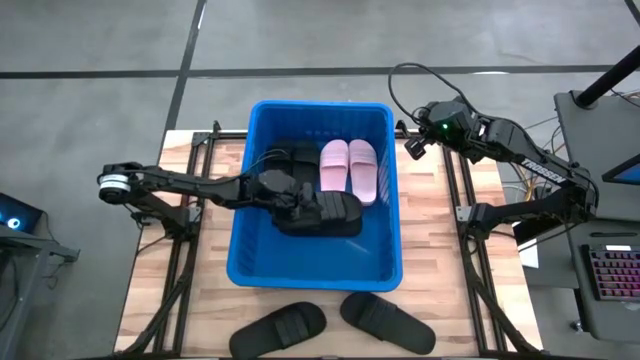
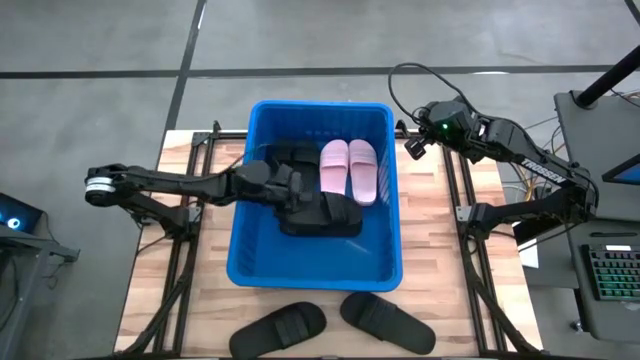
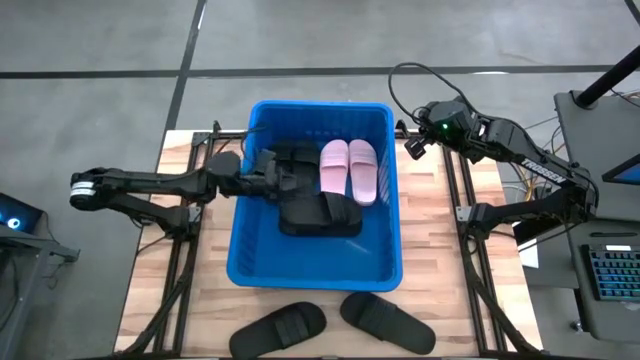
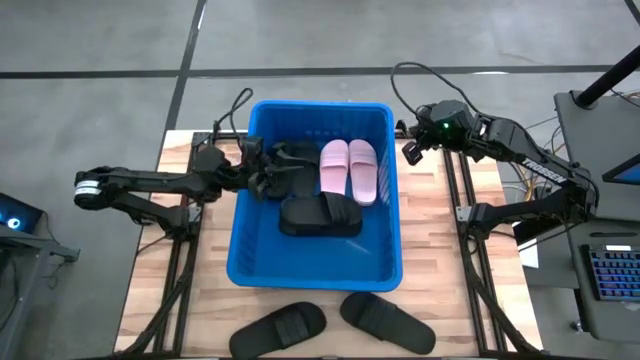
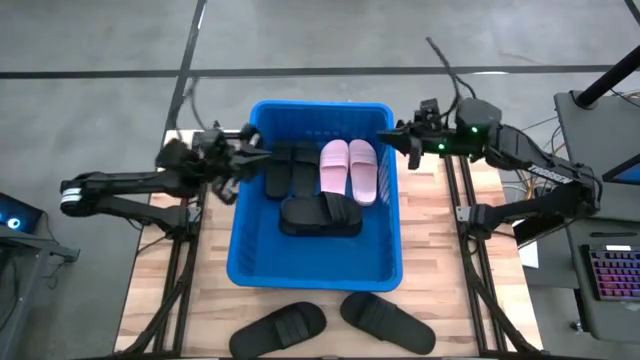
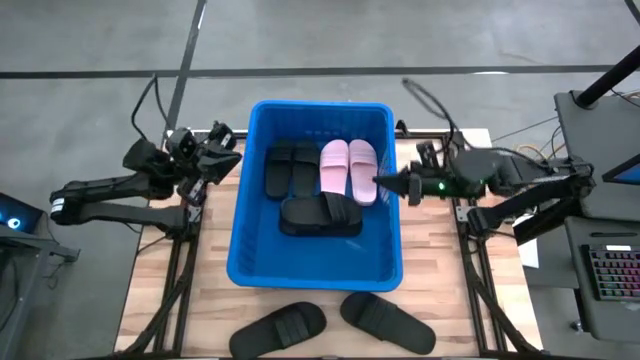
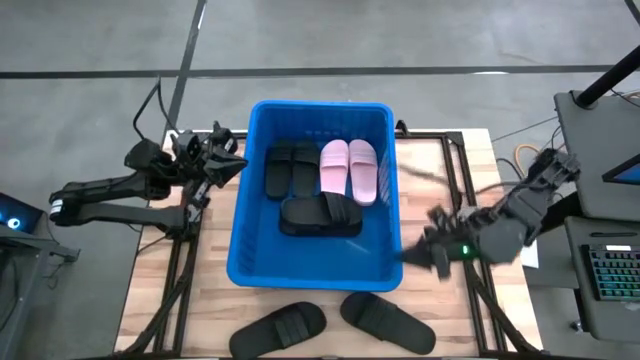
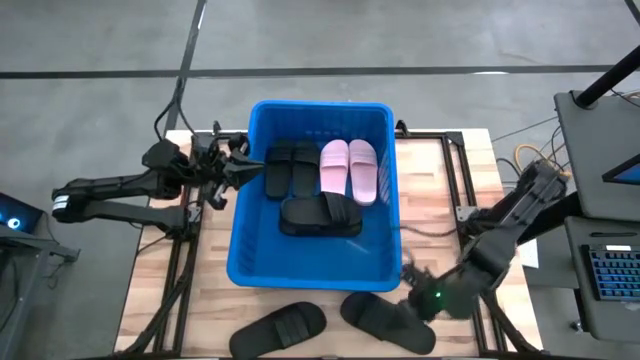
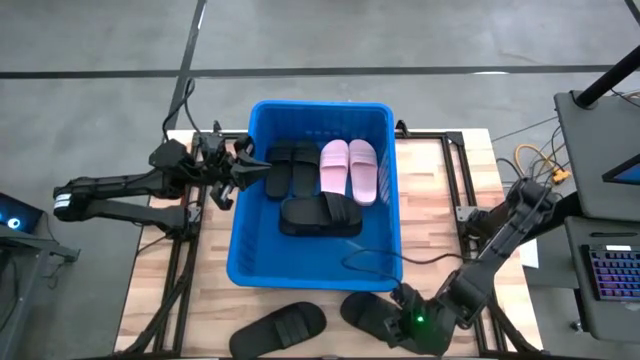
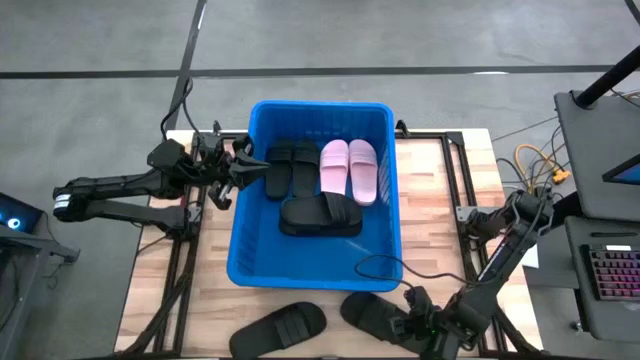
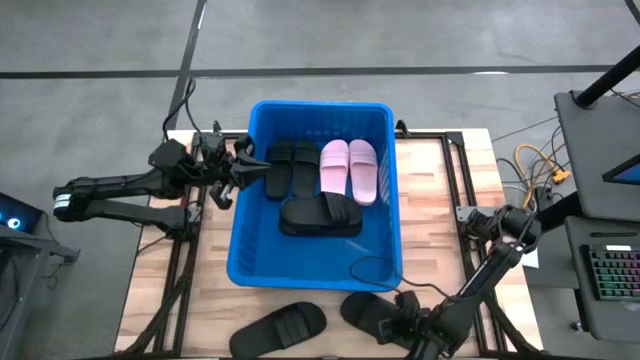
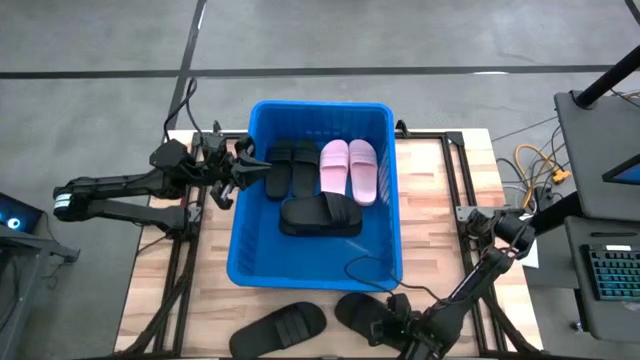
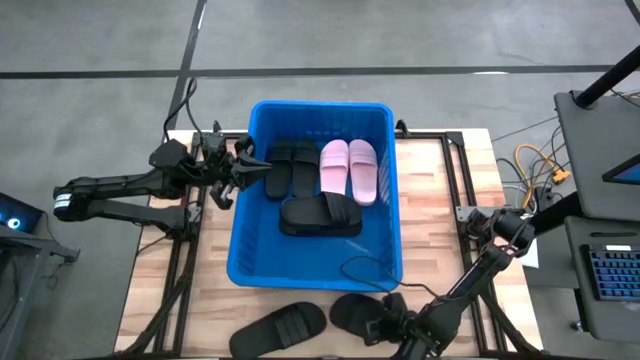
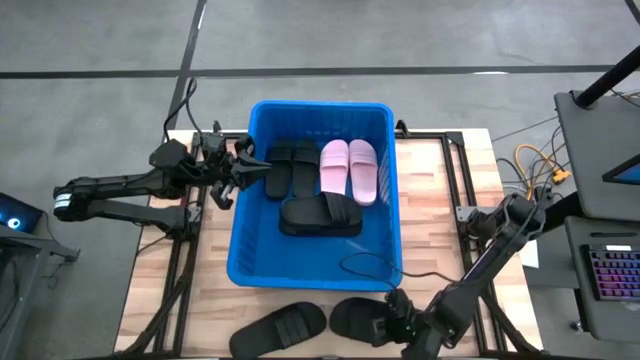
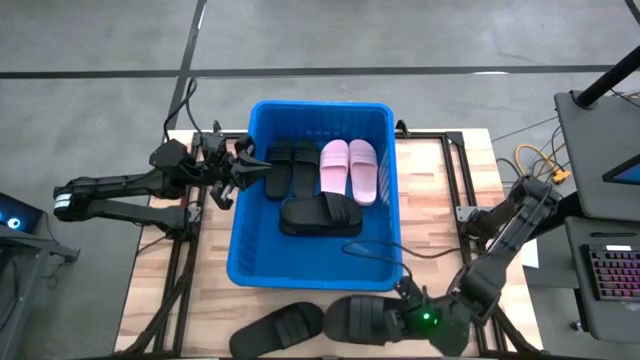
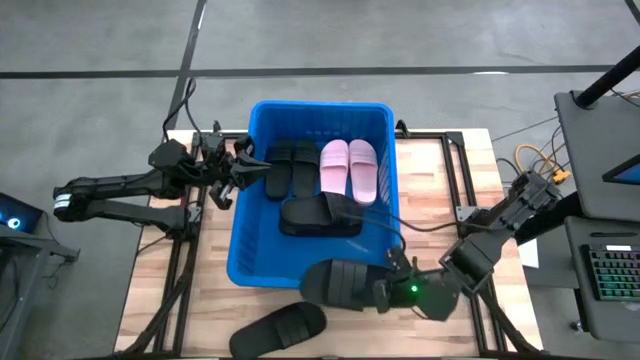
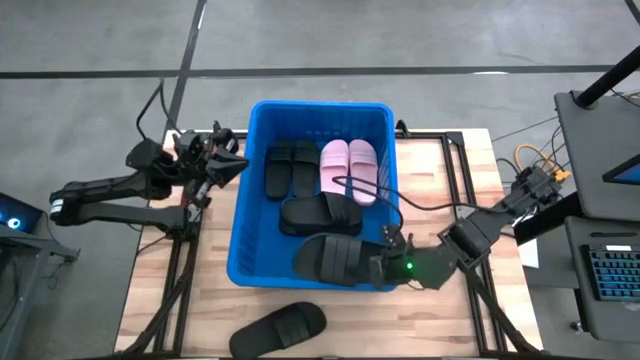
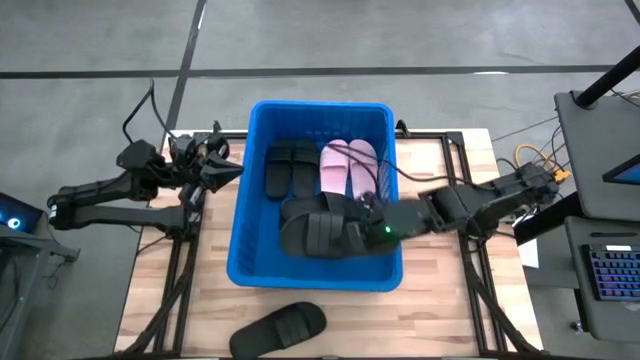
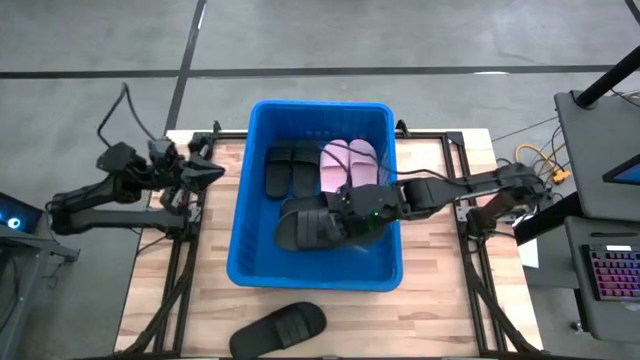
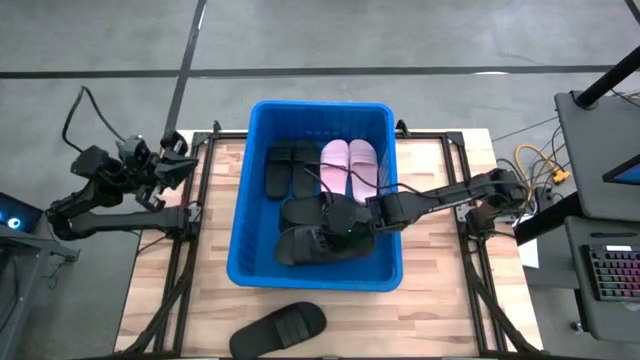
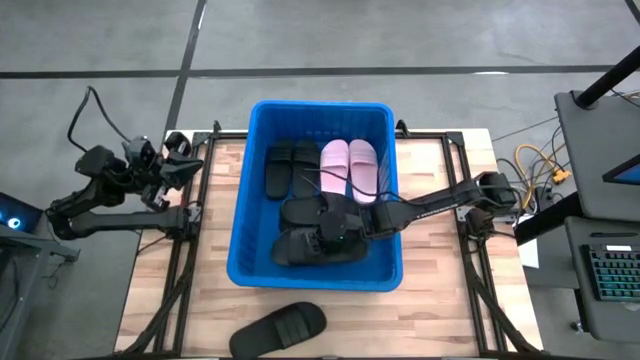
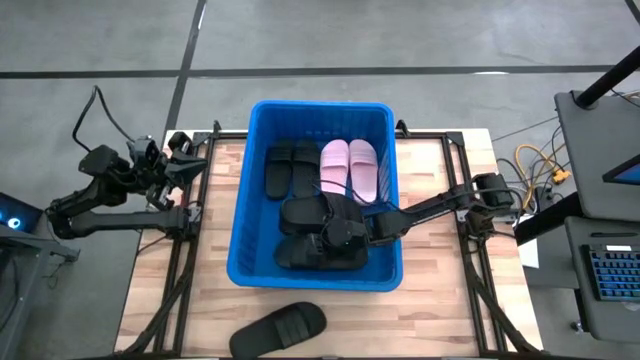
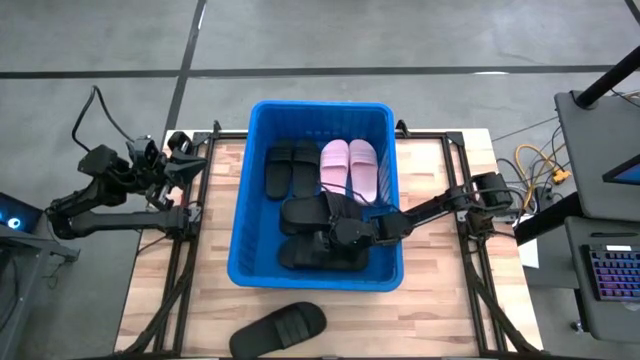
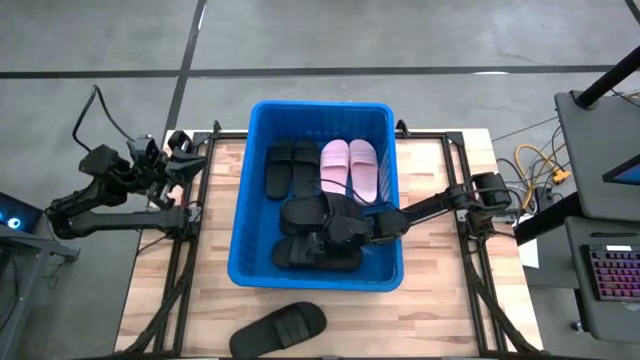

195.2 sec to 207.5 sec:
Task: Pick and place slides into bin
Put the black slide into the blue bin

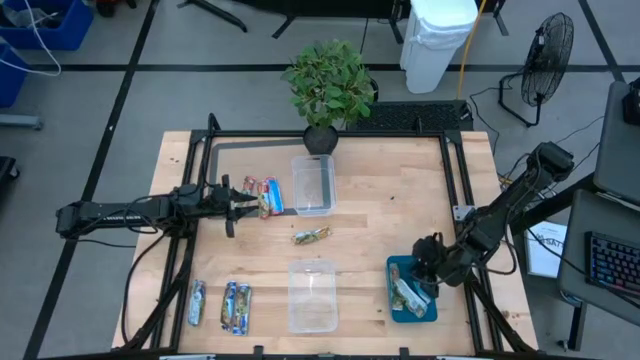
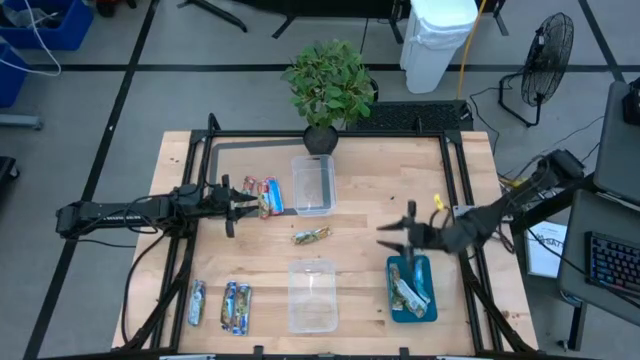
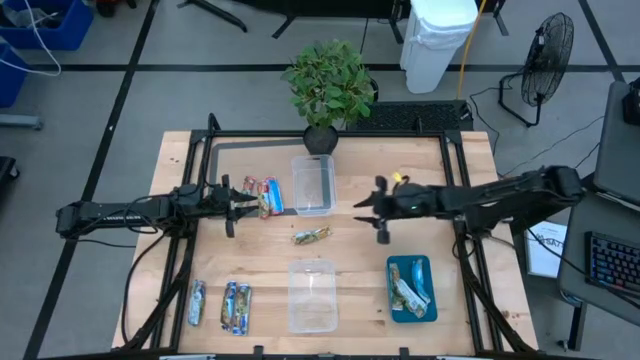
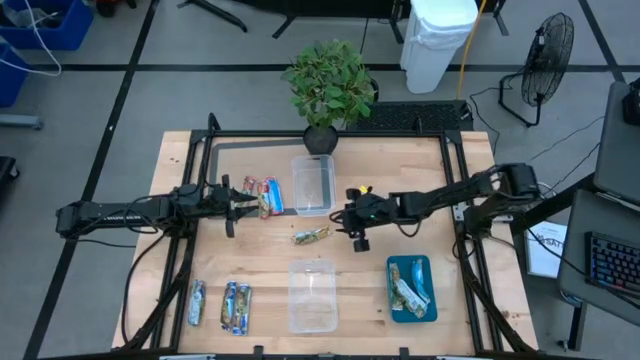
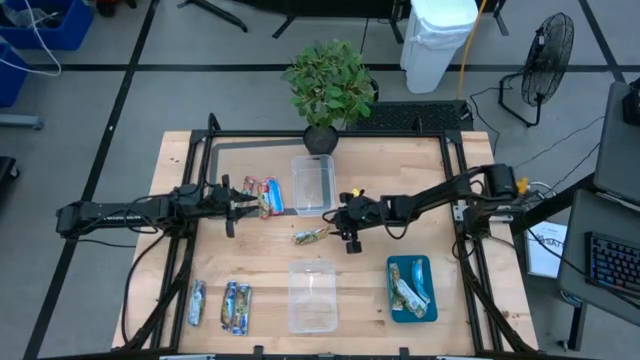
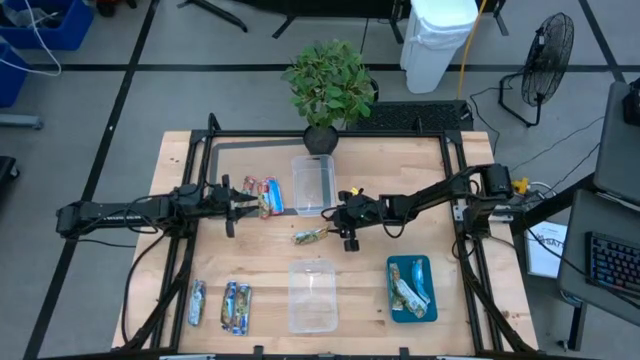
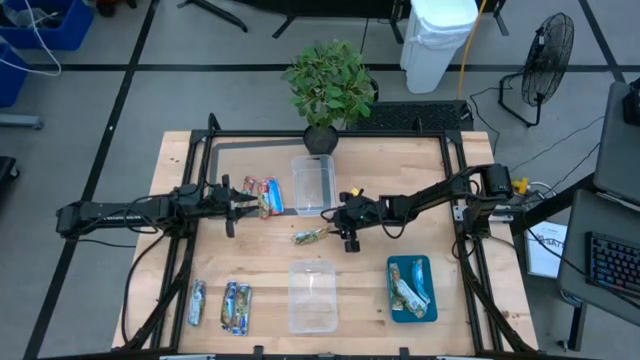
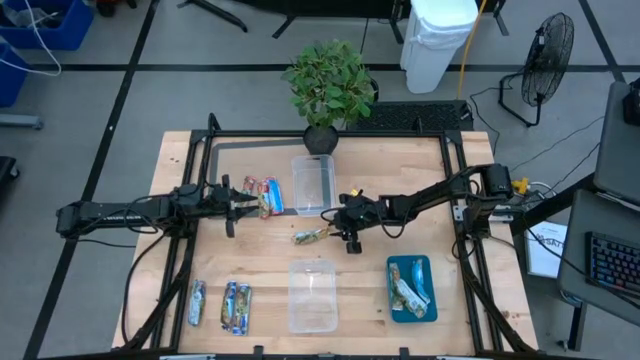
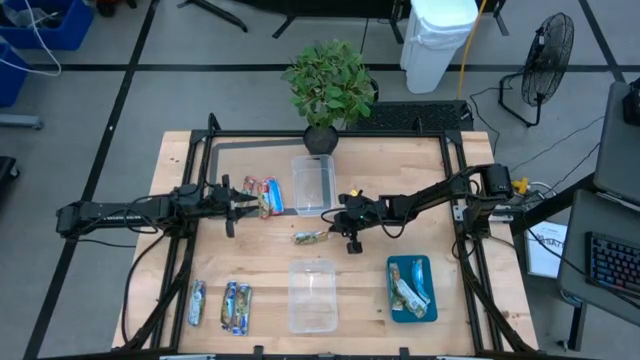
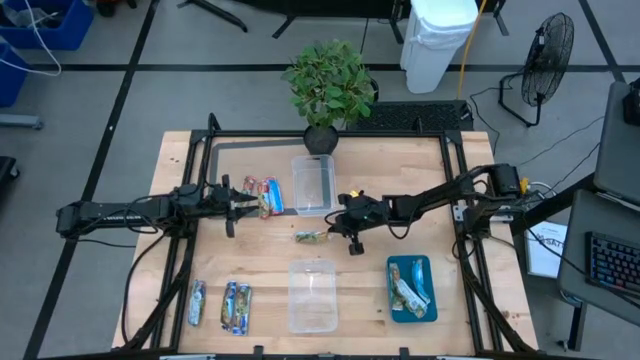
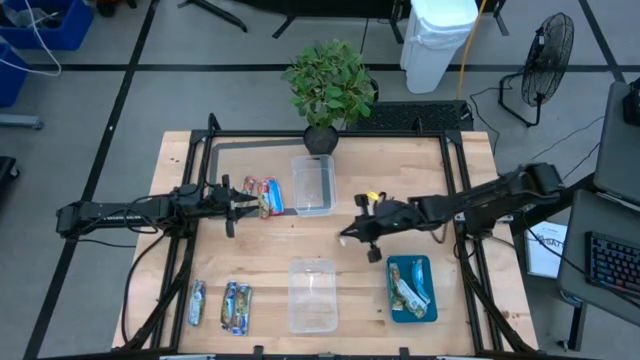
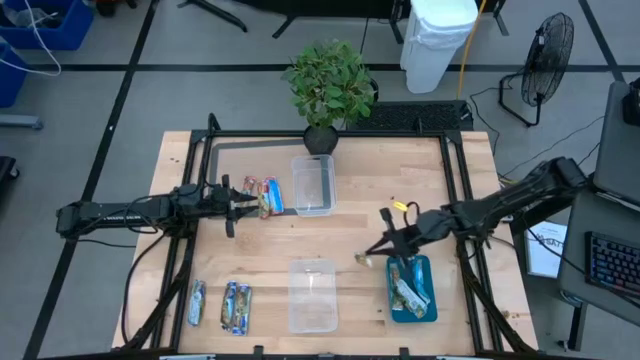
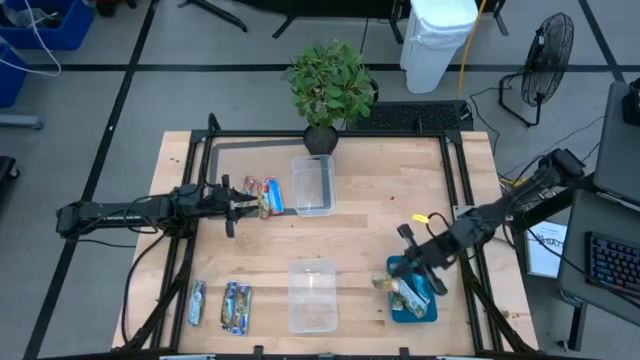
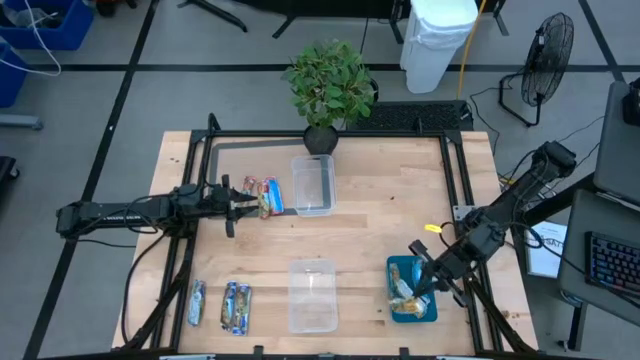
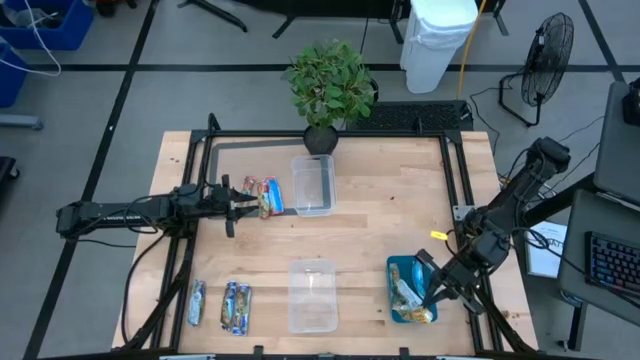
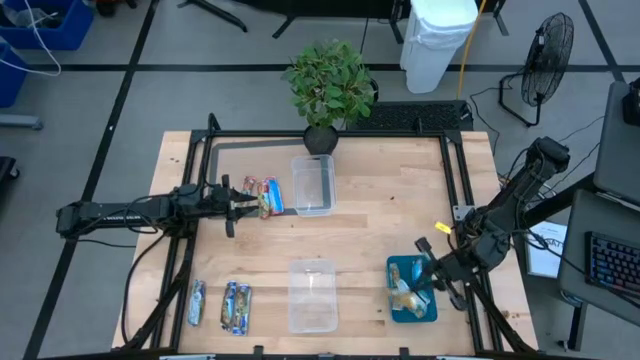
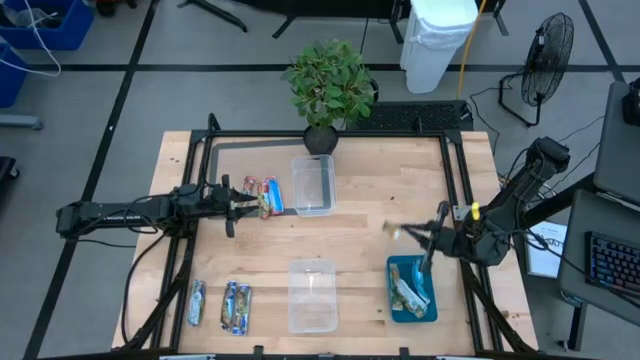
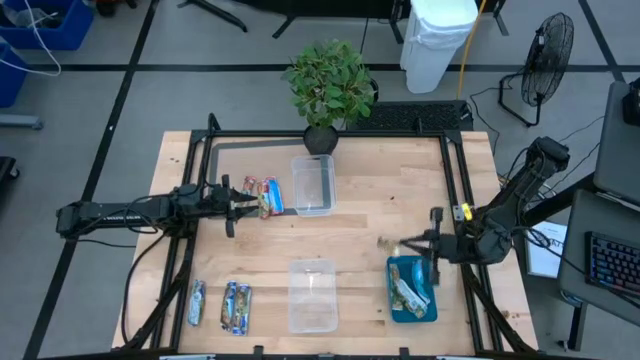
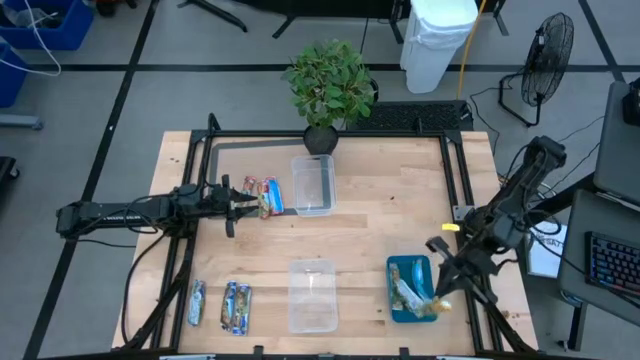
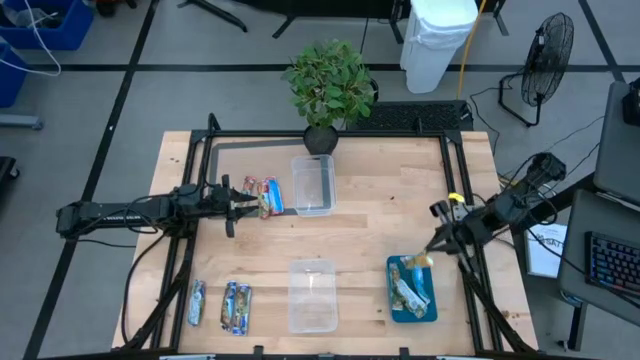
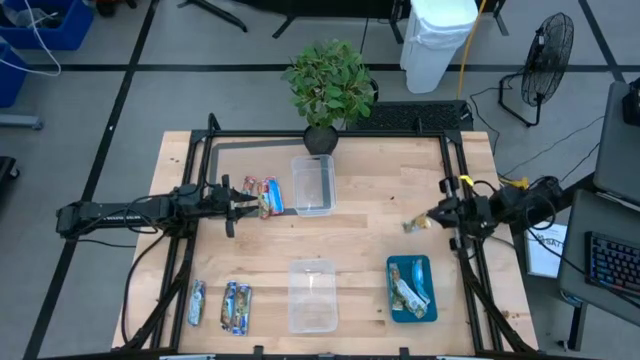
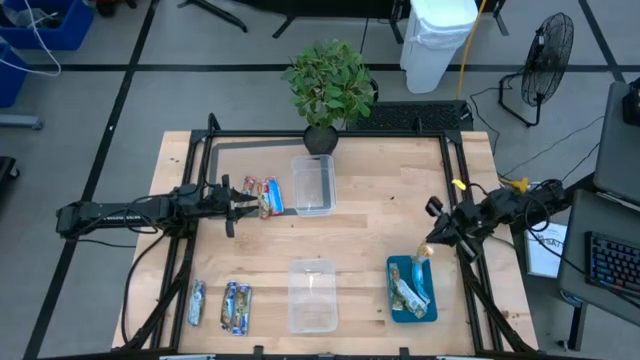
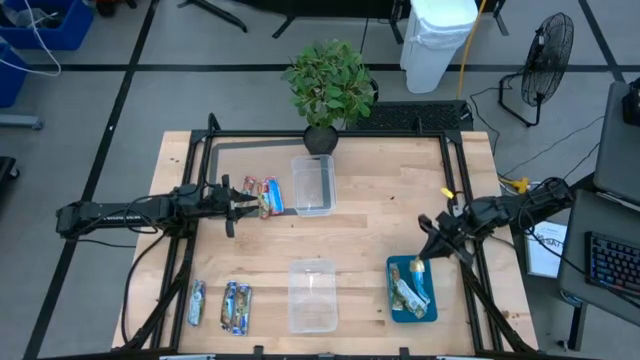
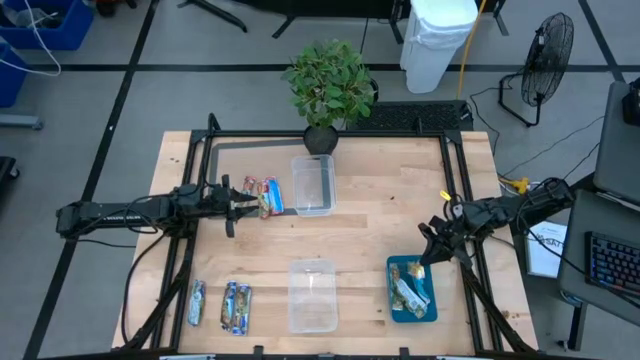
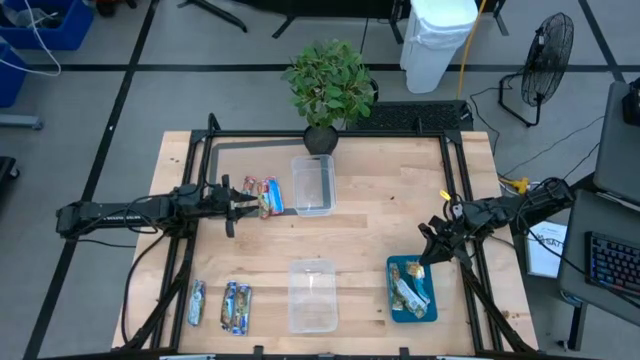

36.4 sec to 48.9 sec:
Task: Pick and place Granola Bars by type
Put the yellow granola bar into the blue bin
